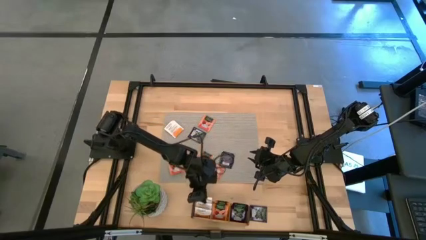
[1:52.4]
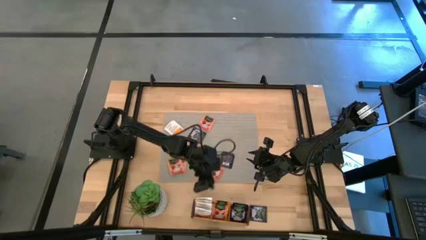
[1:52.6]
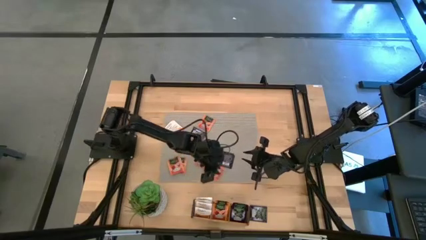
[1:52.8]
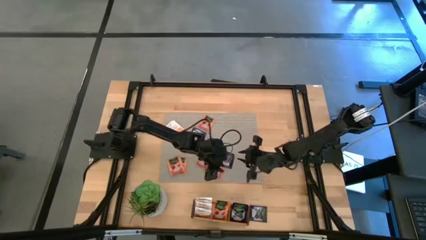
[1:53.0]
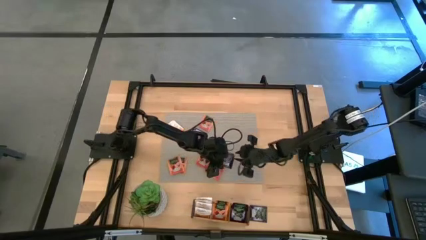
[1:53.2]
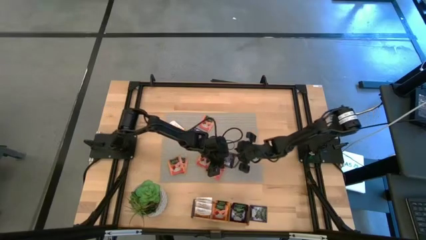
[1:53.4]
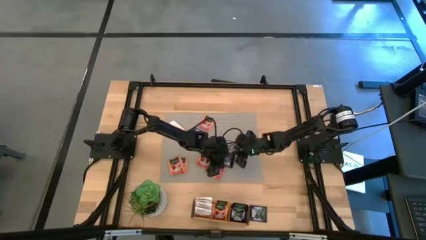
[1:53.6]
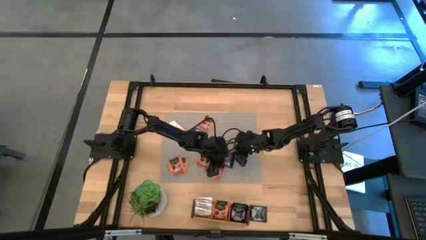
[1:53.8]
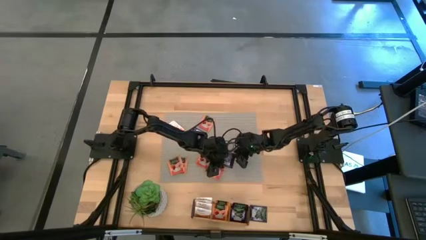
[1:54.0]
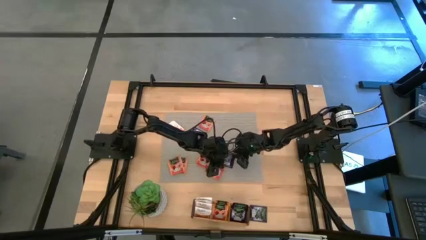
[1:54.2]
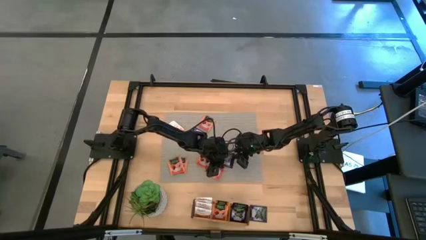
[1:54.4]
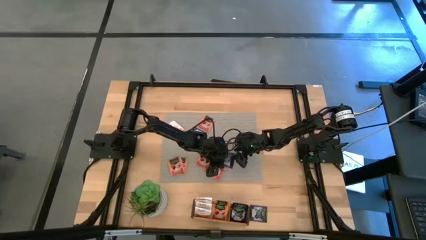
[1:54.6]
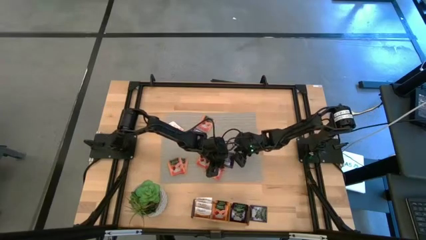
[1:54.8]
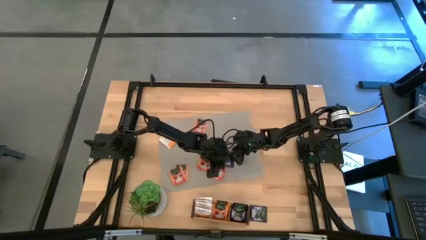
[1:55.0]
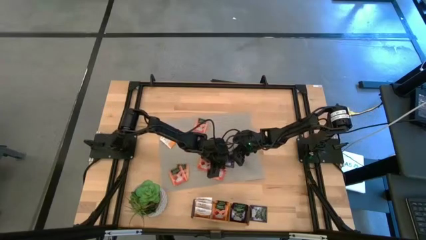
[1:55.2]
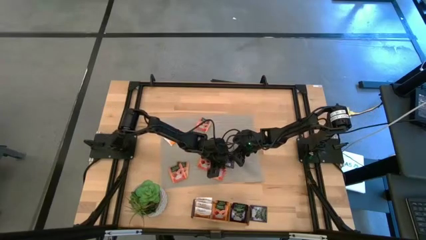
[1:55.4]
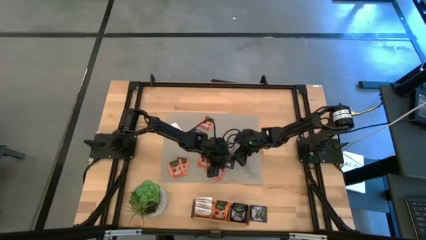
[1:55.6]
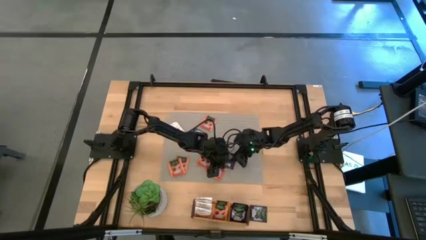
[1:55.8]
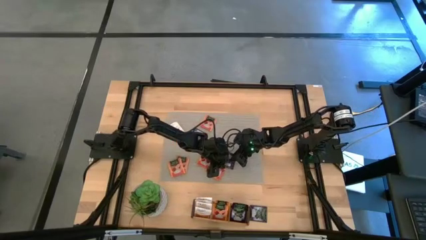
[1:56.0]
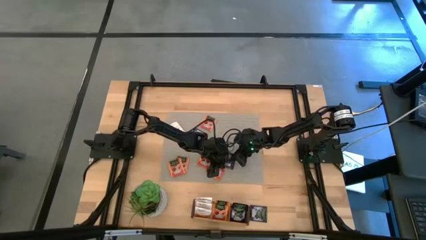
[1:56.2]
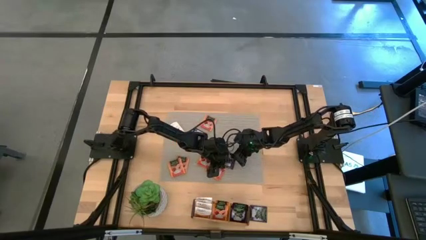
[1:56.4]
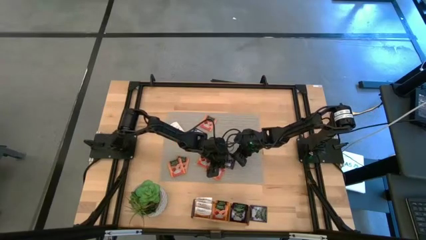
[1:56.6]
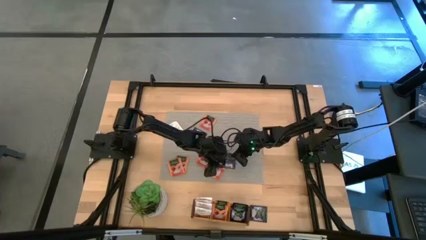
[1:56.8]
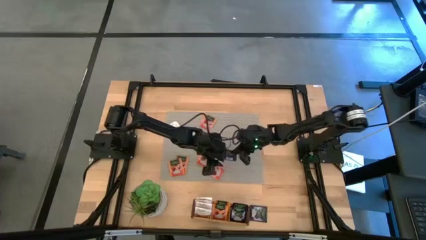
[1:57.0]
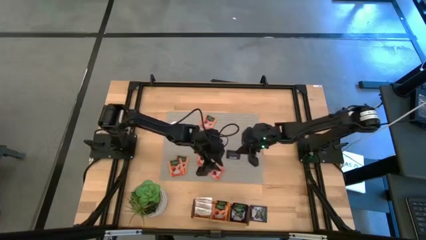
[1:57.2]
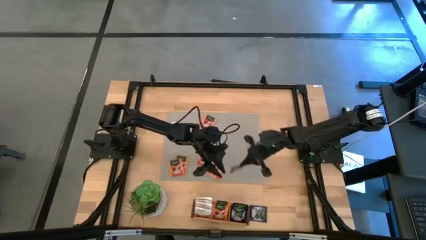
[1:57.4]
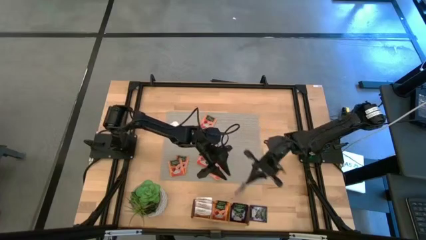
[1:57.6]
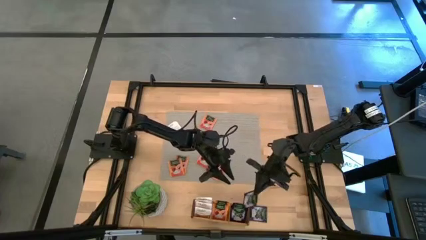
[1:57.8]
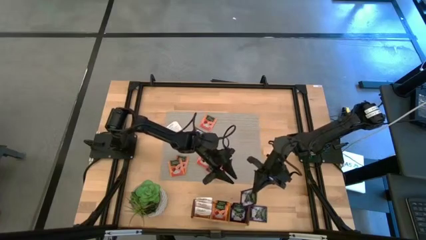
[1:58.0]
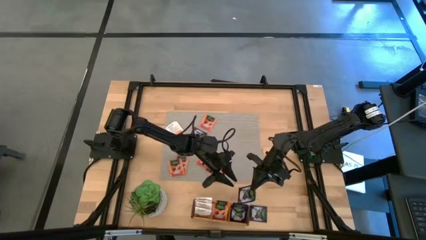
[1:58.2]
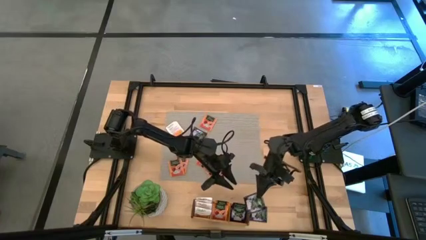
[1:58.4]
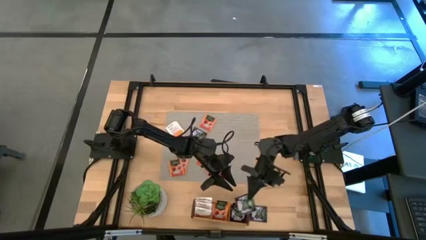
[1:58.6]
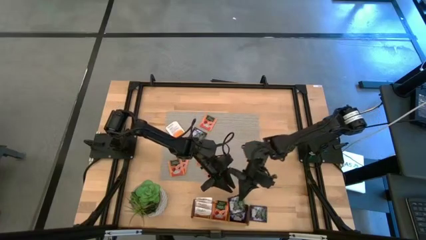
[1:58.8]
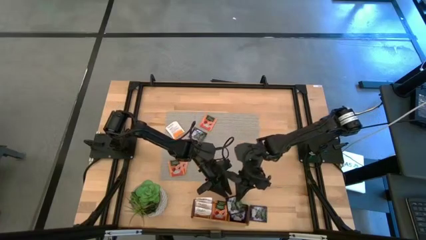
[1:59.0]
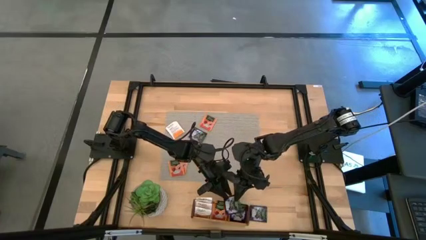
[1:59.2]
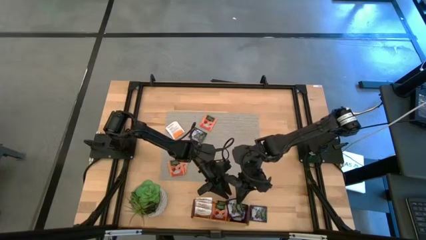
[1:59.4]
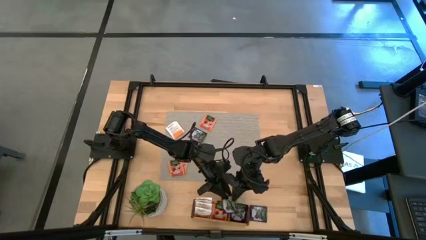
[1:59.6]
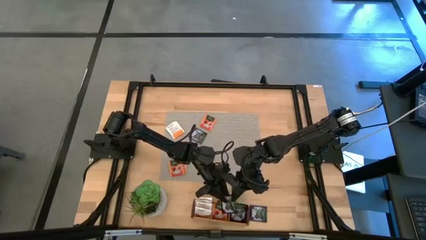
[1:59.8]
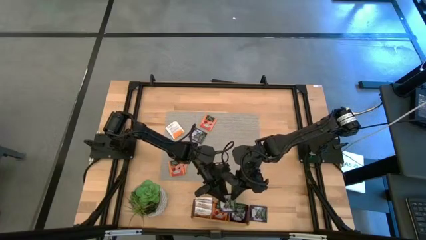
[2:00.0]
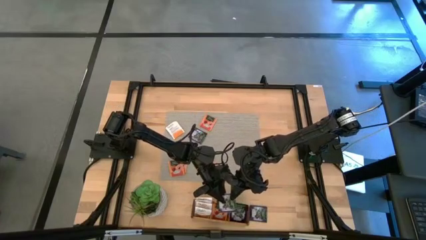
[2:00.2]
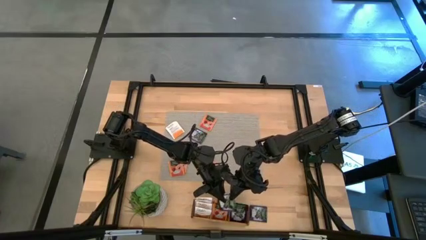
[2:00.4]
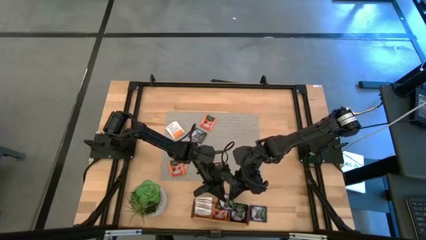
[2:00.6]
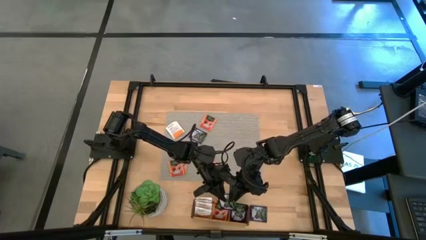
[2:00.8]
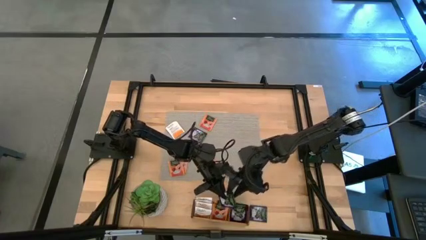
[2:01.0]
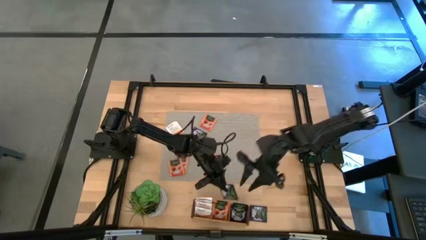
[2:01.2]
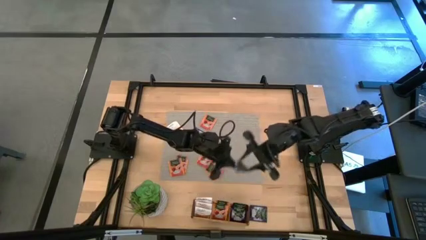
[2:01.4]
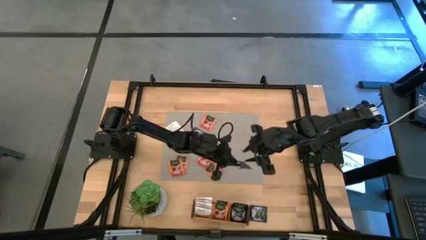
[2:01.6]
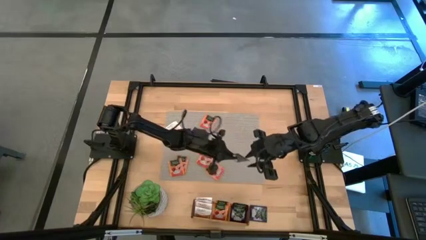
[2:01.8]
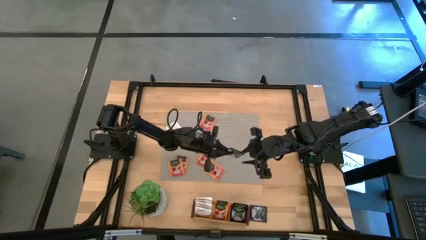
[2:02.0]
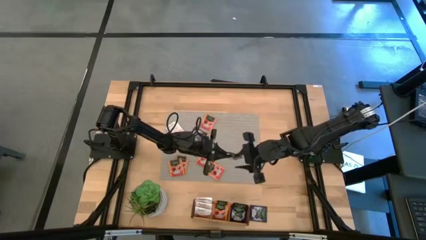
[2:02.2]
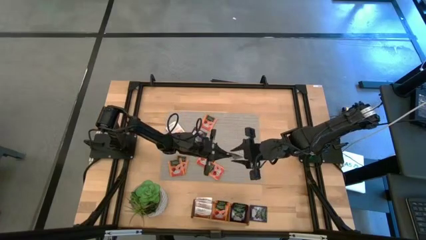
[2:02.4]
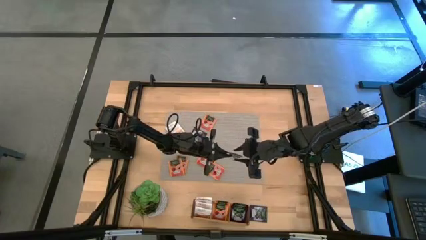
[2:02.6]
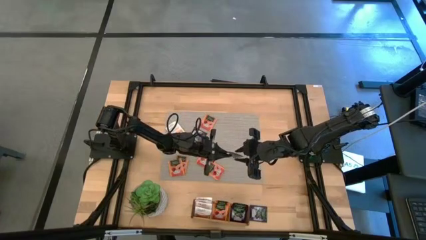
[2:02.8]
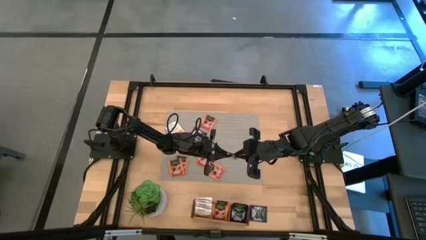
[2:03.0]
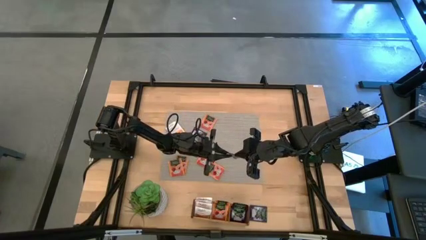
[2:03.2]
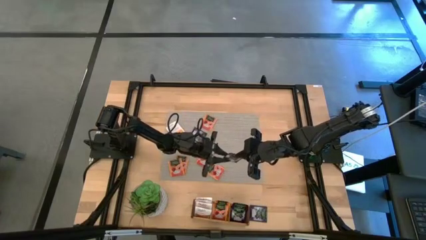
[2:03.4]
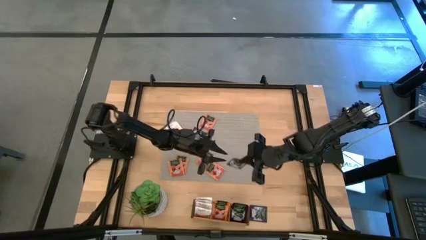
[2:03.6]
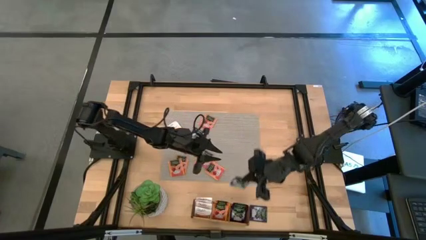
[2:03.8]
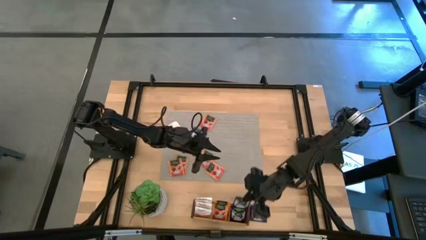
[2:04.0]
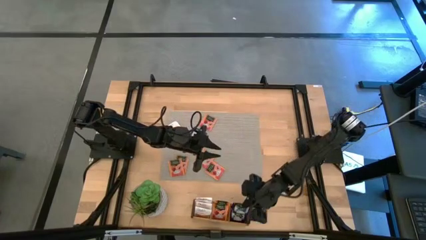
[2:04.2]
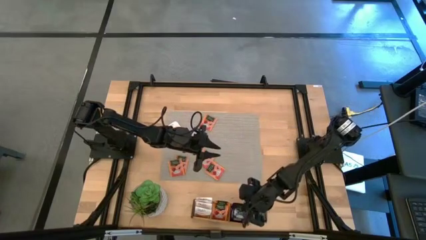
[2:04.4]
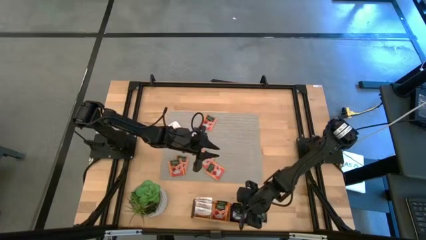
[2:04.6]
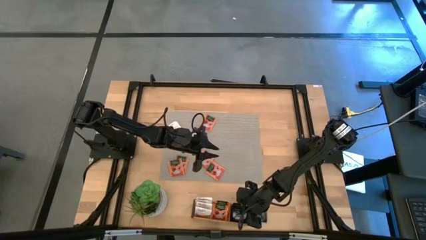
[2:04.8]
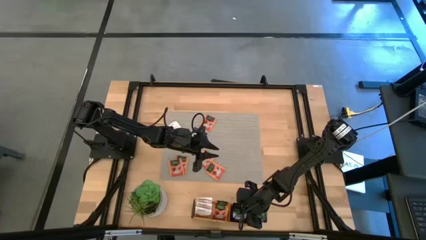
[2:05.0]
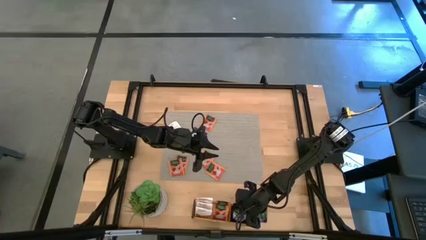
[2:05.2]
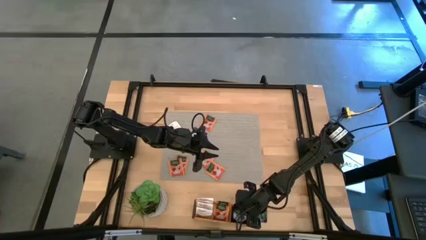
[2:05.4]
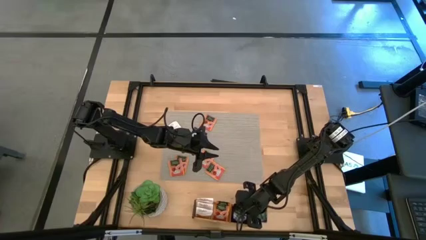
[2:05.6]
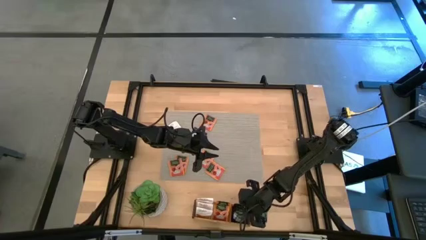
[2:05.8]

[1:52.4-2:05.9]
Task: Pick & Place Tea
Put the black tea bag into the right section of the wooden organizer
